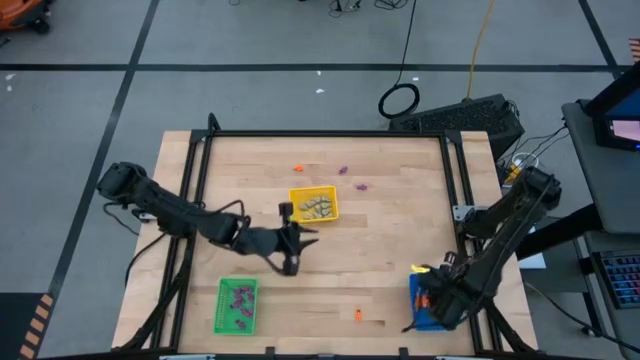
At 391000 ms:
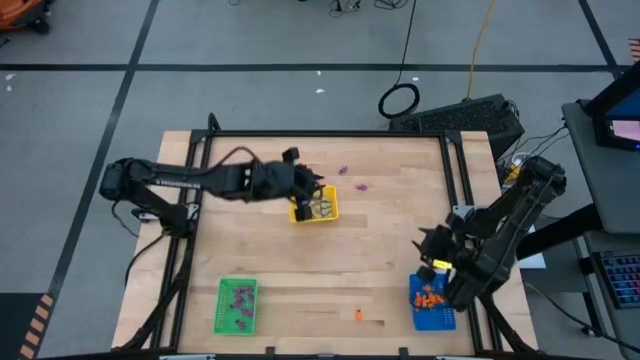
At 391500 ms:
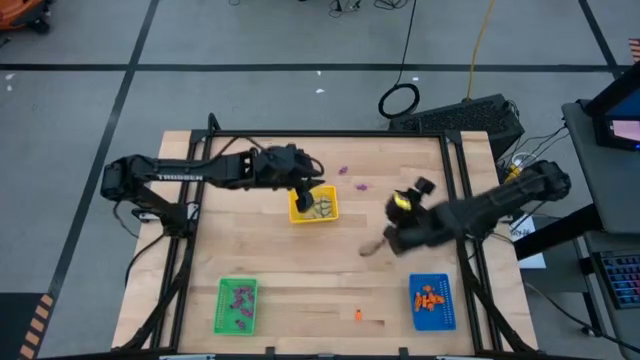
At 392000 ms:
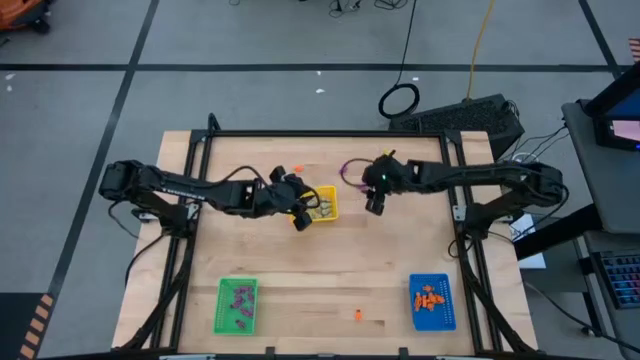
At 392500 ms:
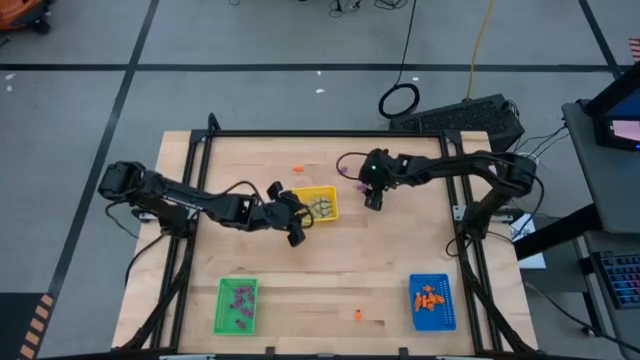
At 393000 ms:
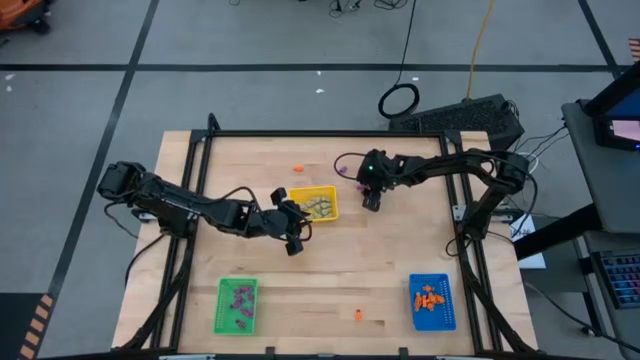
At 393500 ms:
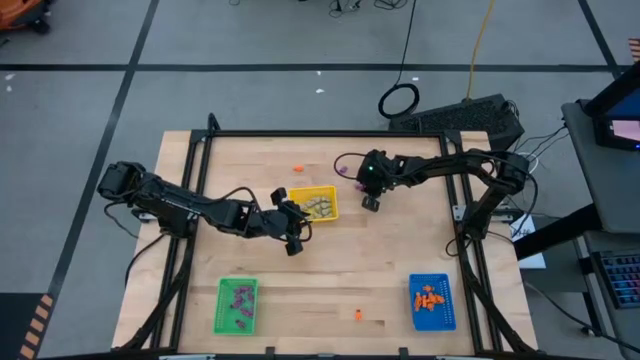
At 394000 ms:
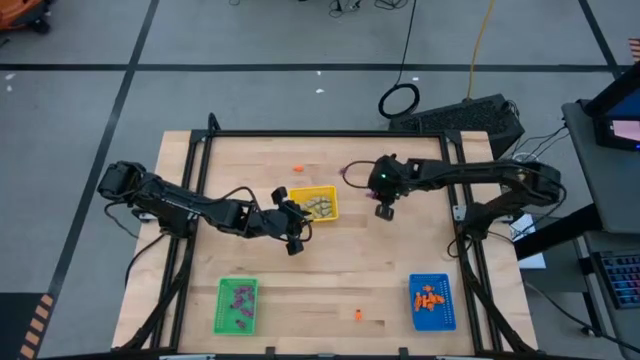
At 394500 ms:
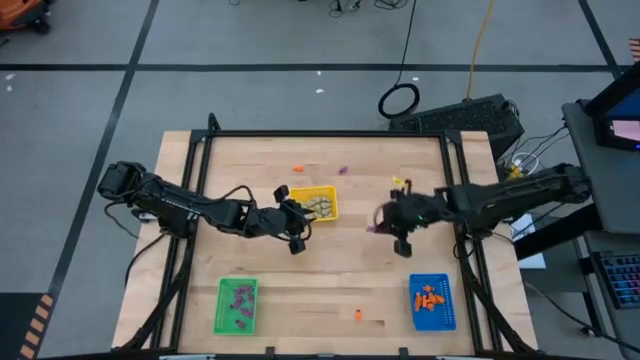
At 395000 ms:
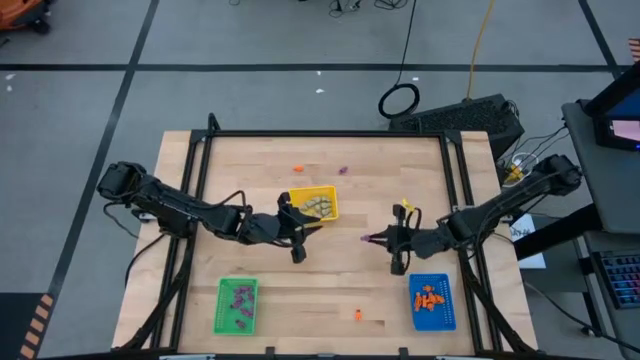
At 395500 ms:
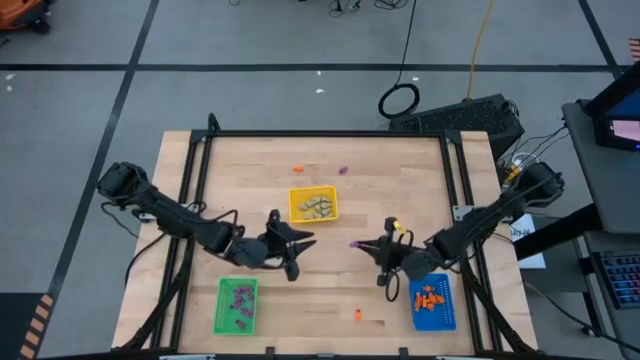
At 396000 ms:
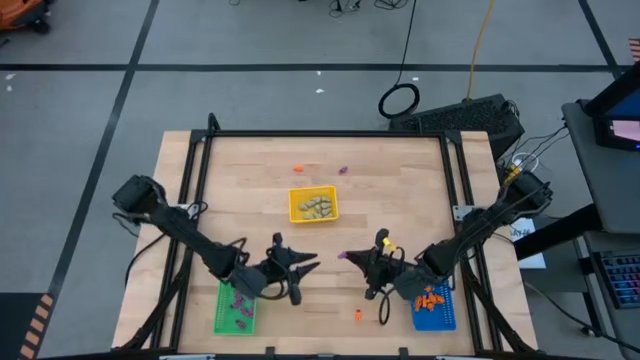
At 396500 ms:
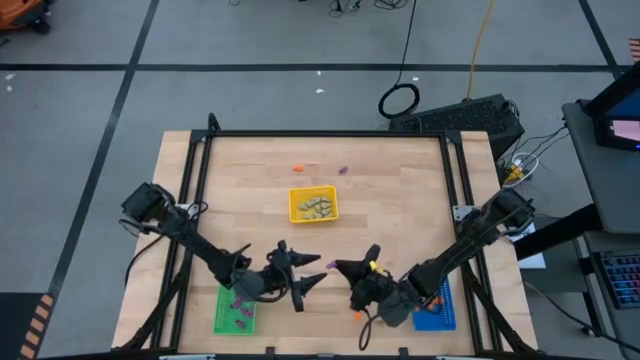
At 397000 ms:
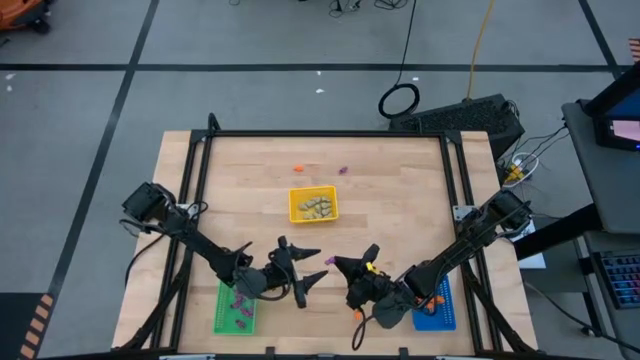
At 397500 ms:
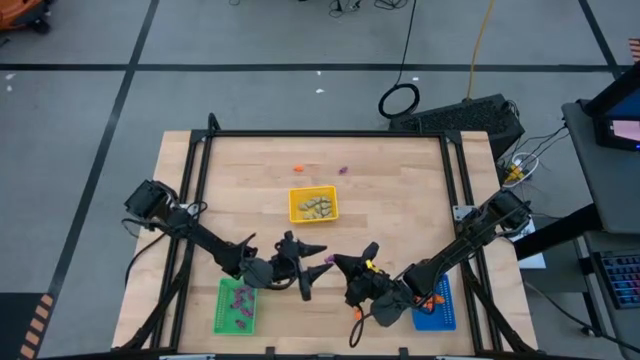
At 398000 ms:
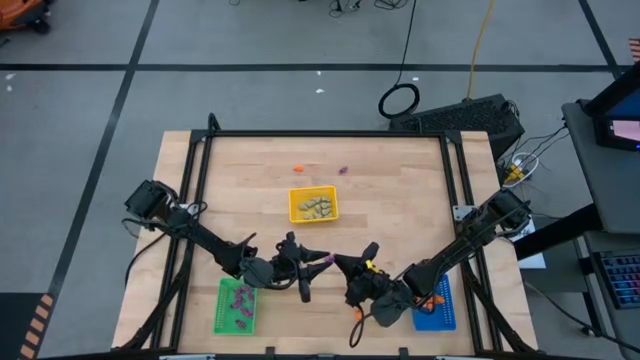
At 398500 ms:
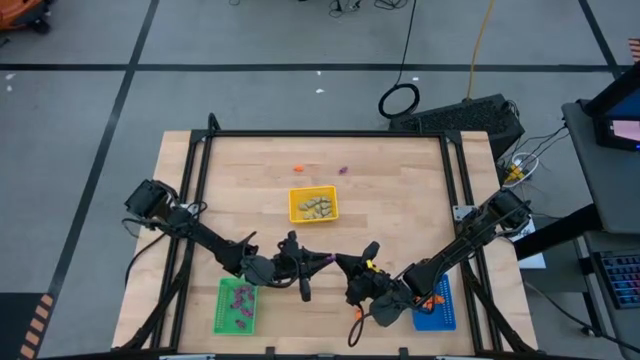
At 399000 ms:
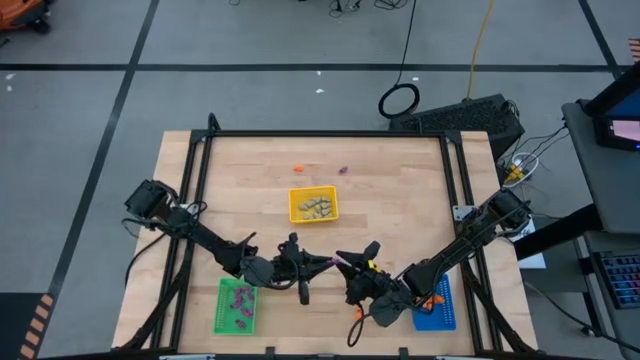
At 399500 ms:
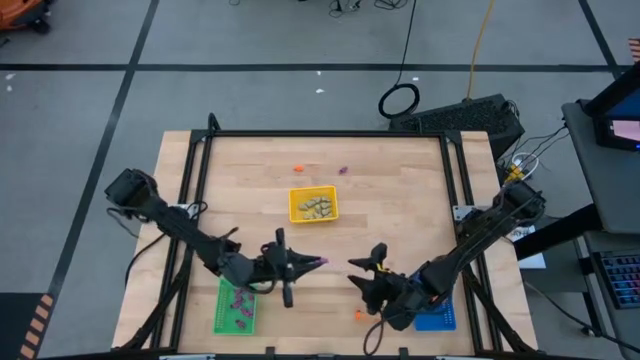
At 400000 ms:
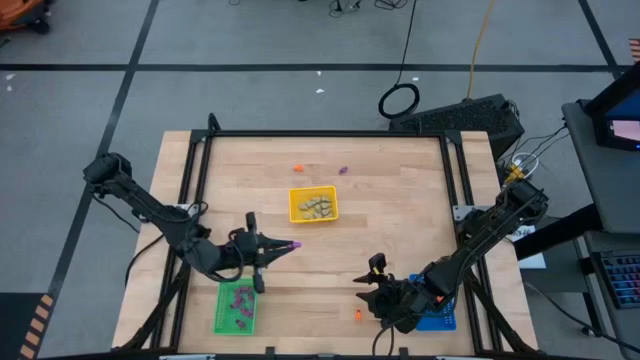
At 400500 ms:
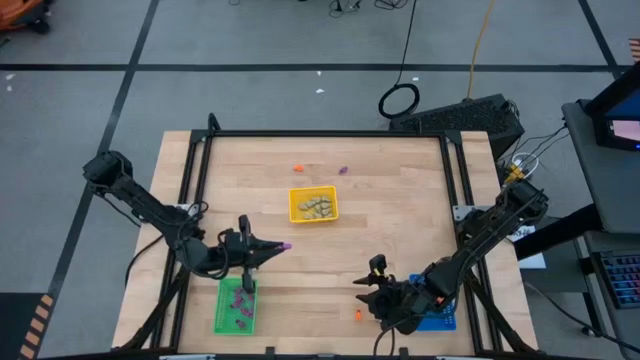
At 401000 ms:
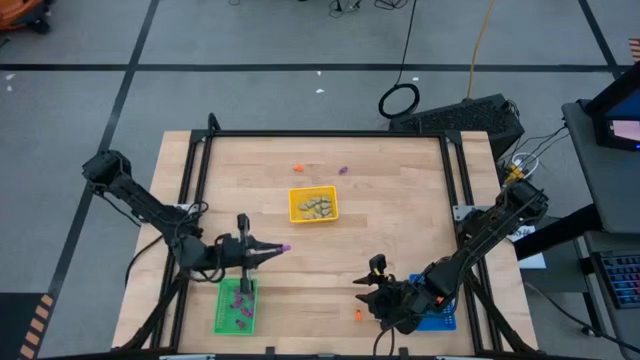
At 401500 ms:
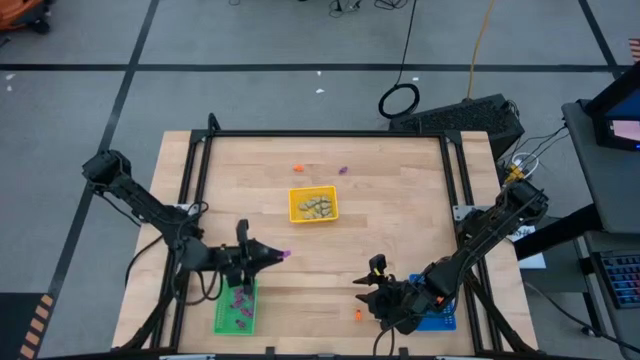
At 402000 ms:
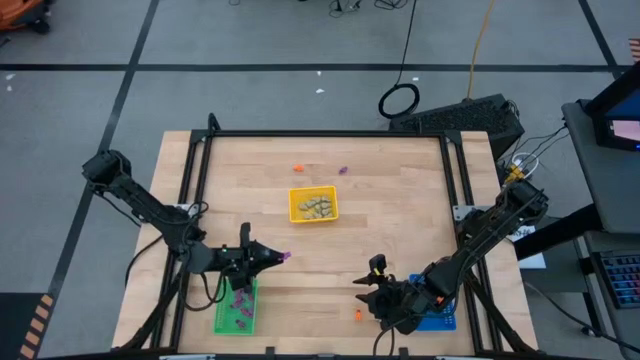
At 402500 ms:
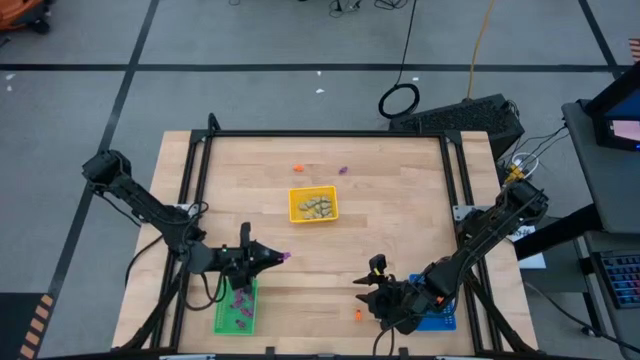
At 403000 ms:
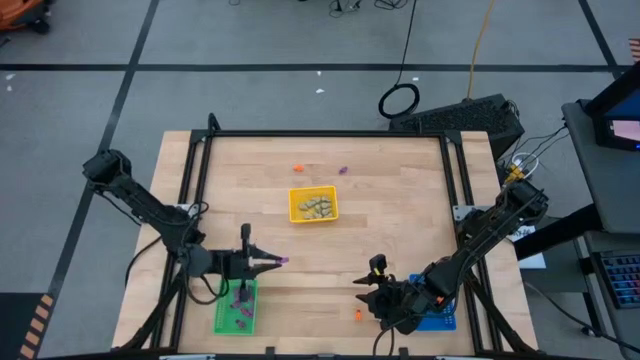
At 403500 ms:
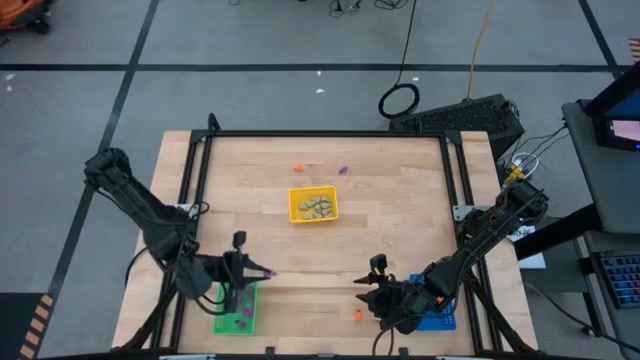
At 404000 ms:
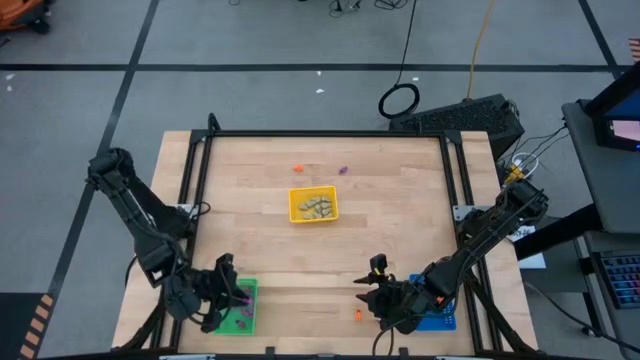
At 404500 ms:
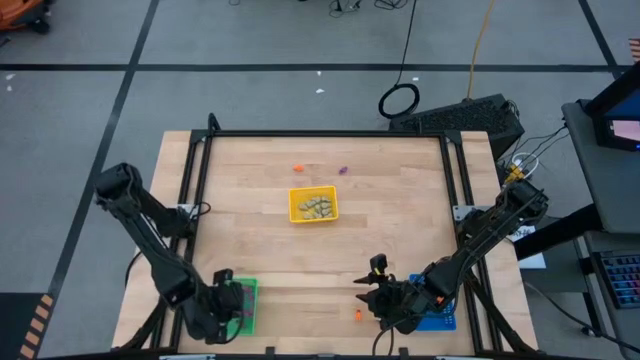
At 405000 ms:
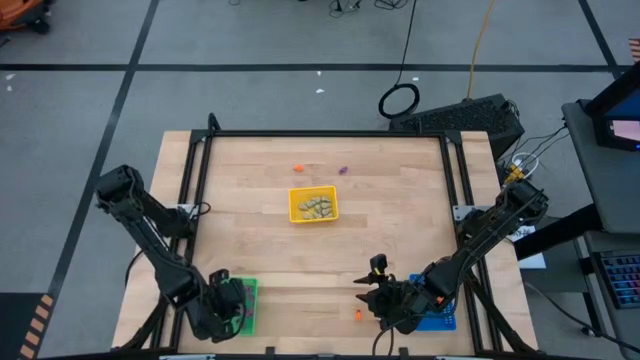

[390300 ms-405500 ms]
Task: Sort Halloween decoration
Put the purple skeleton toy in the green basket
